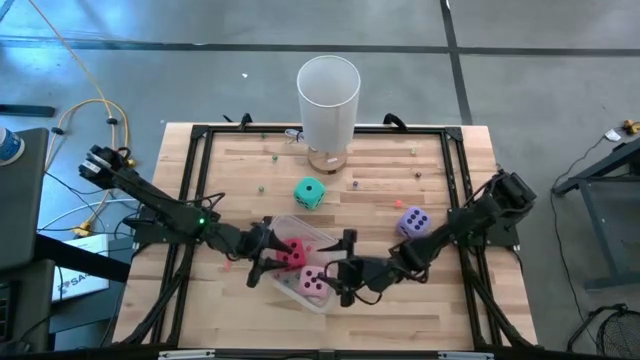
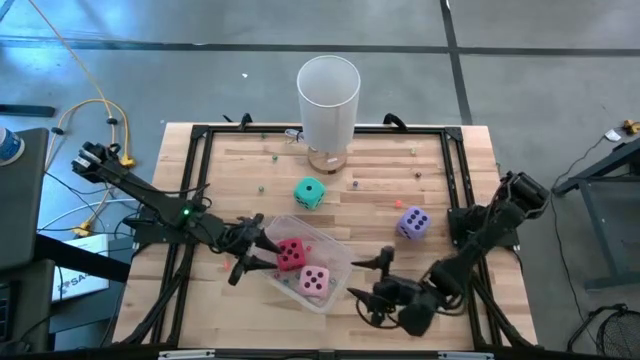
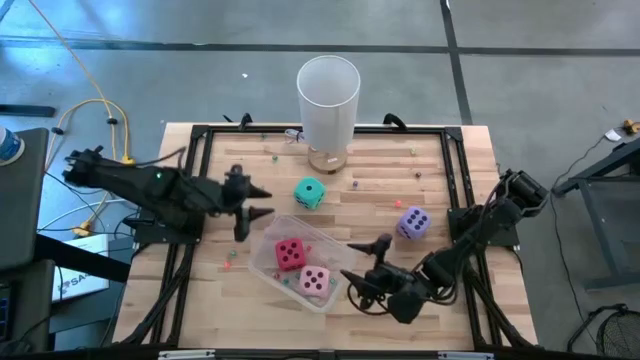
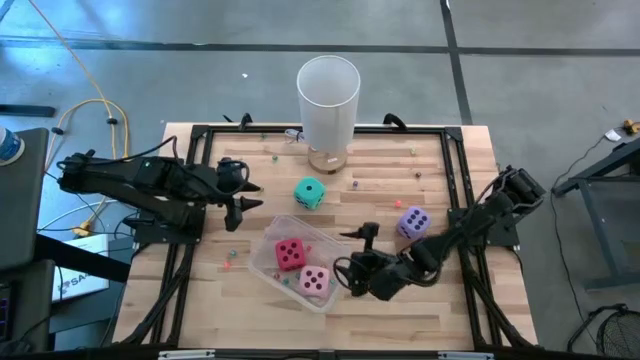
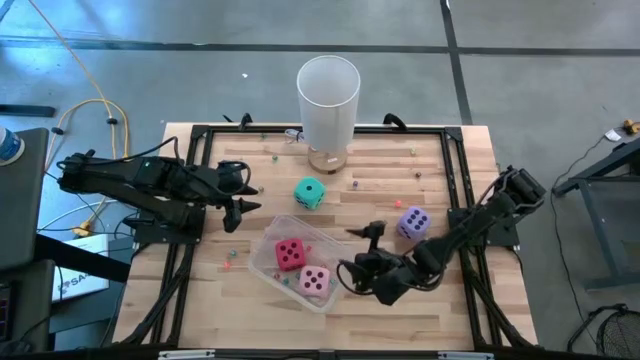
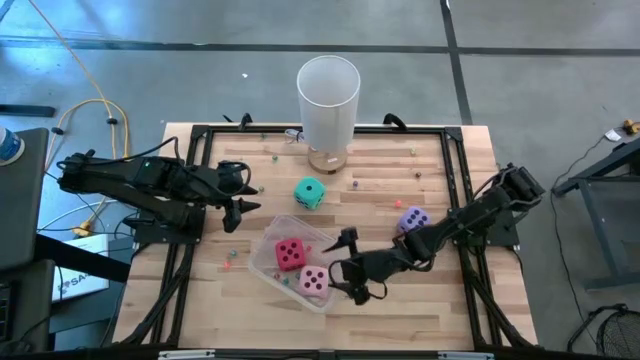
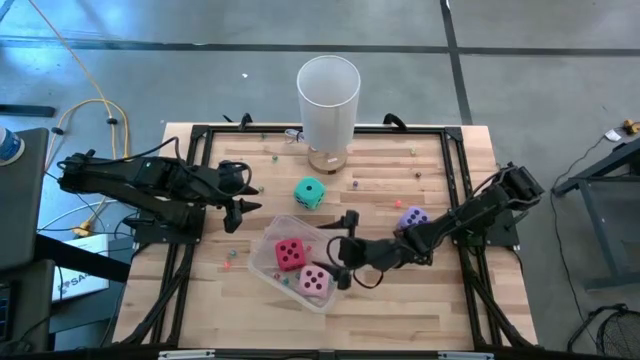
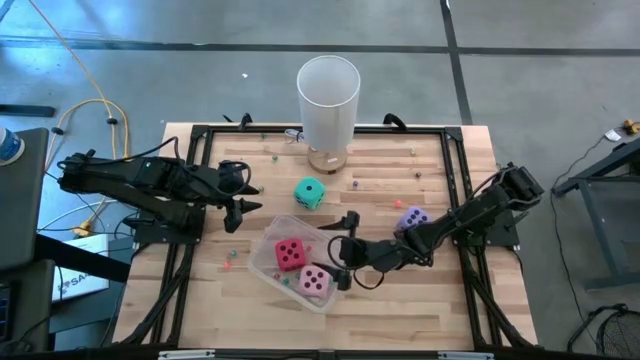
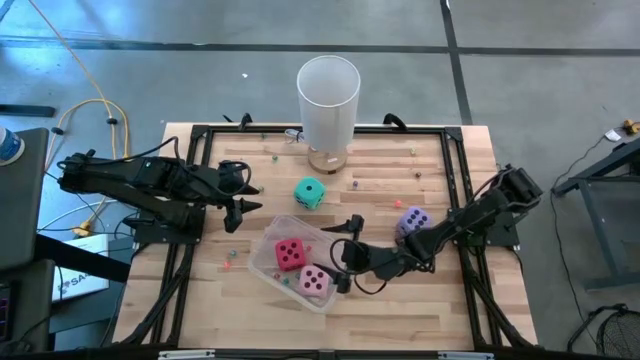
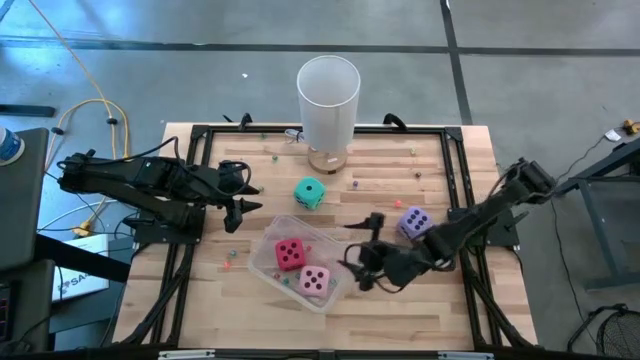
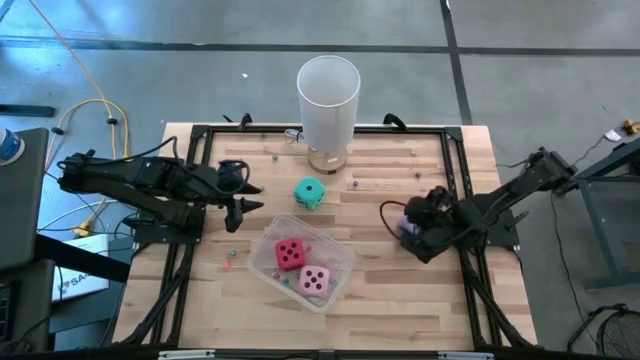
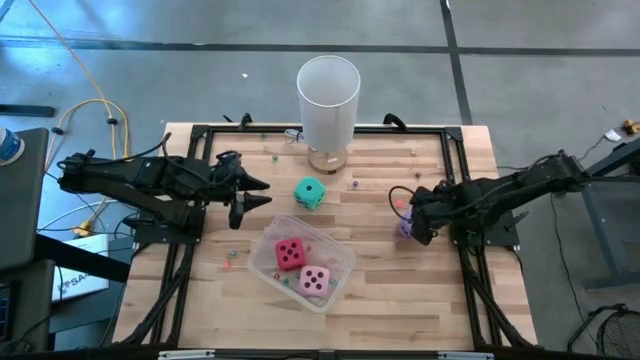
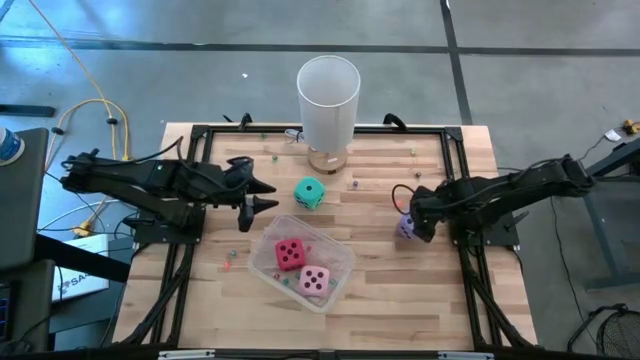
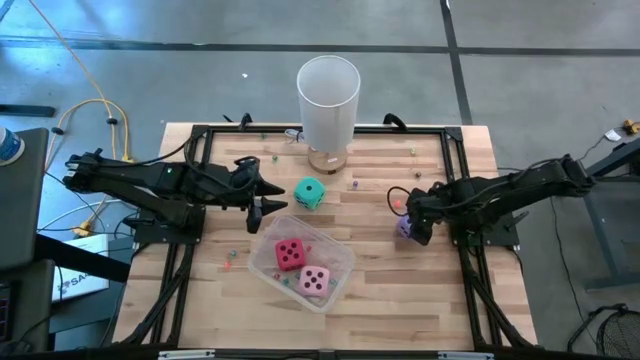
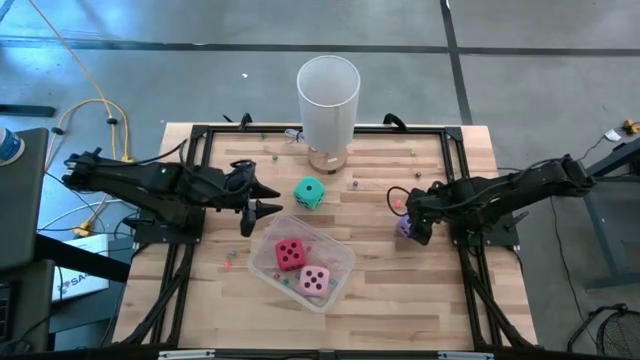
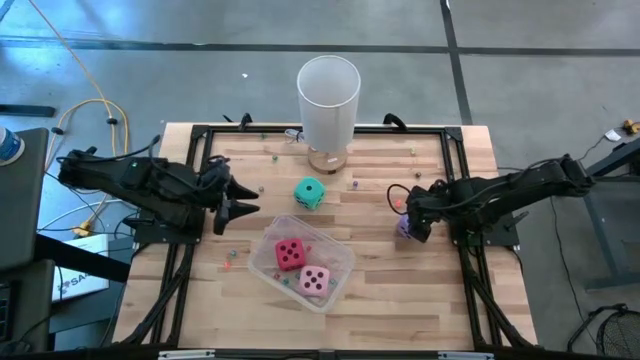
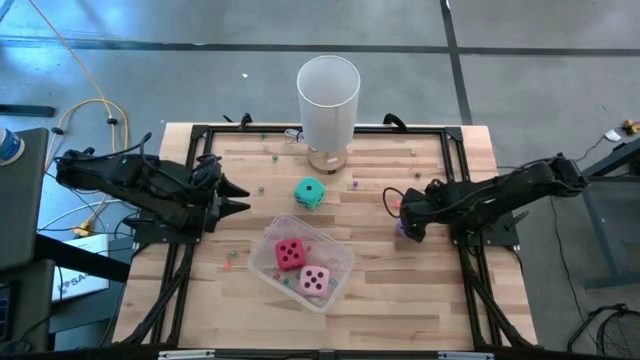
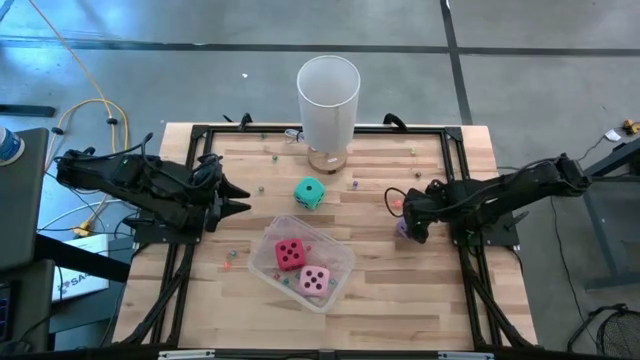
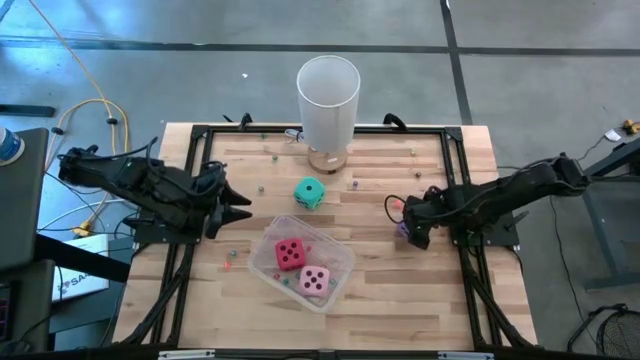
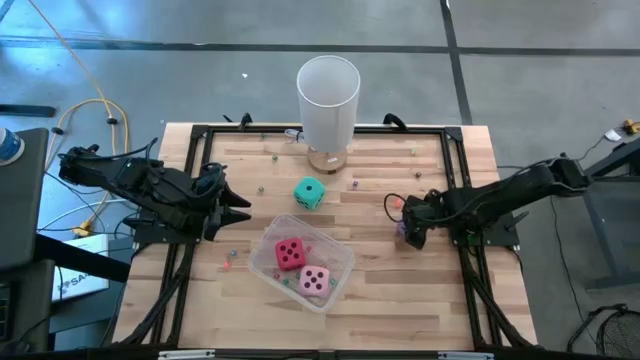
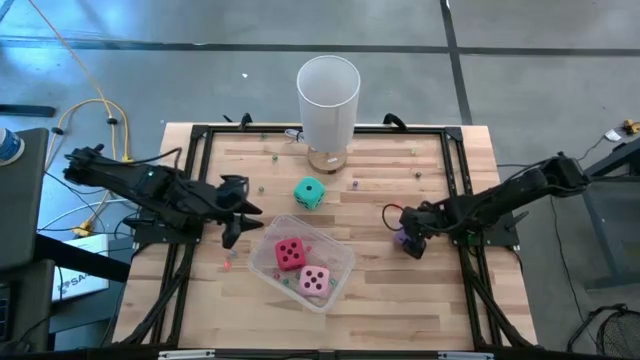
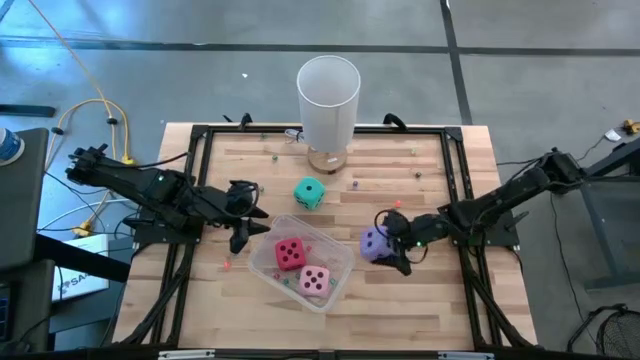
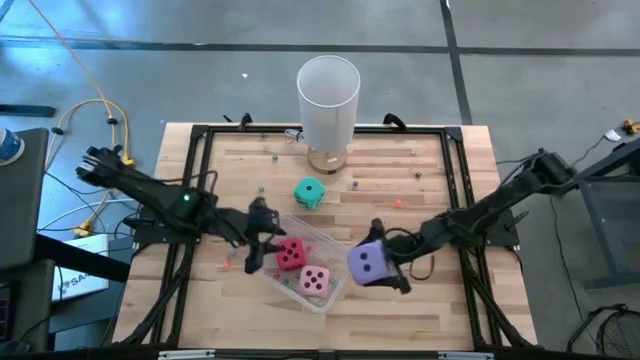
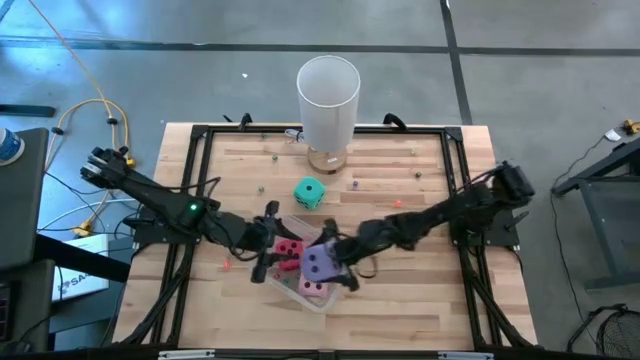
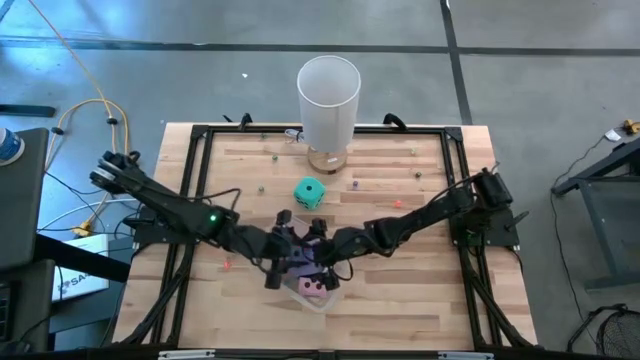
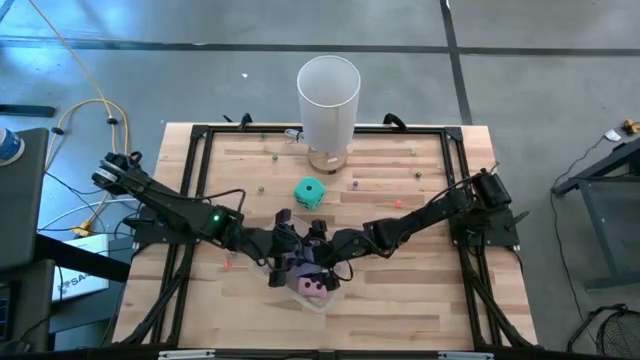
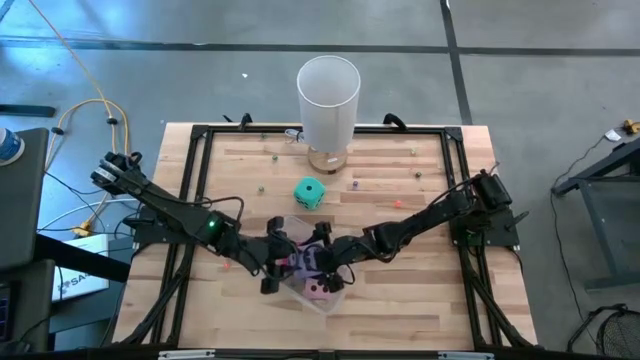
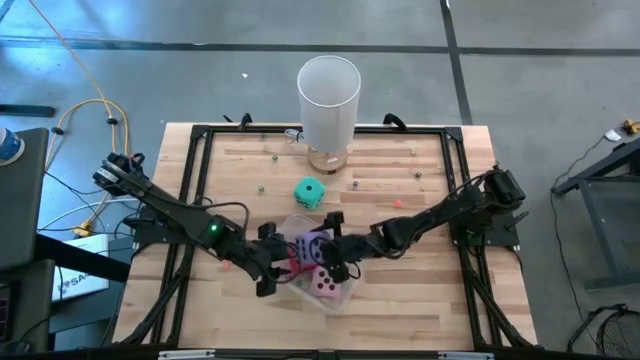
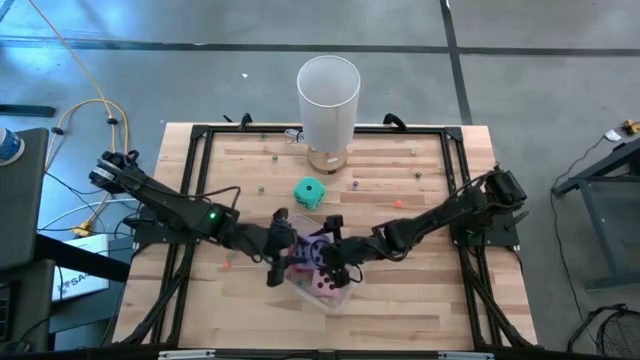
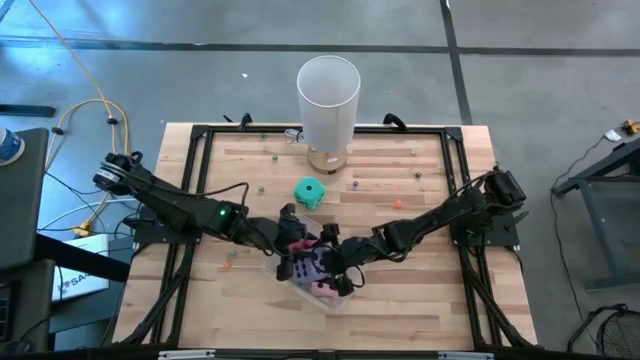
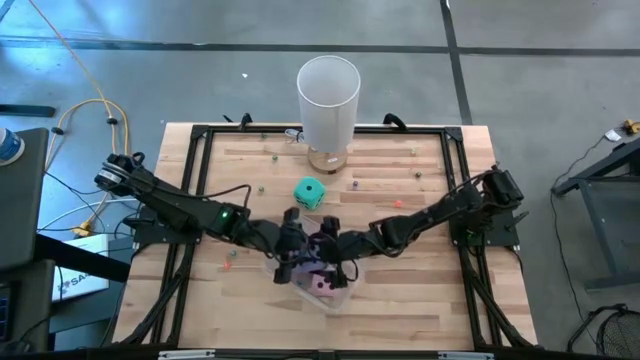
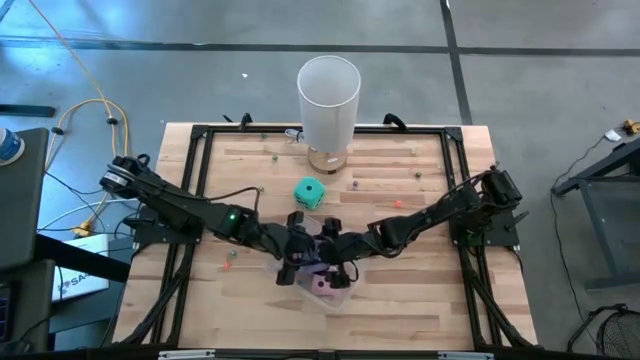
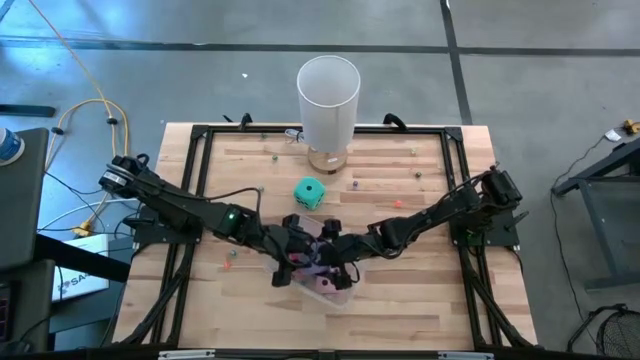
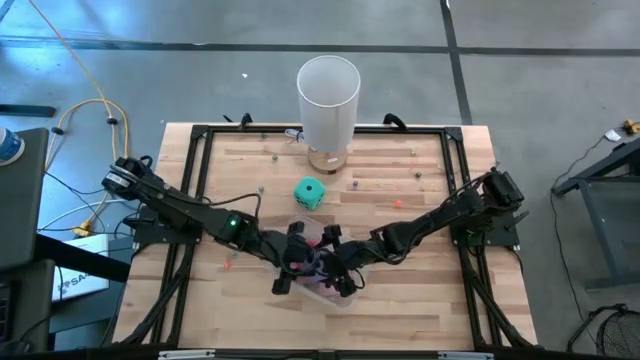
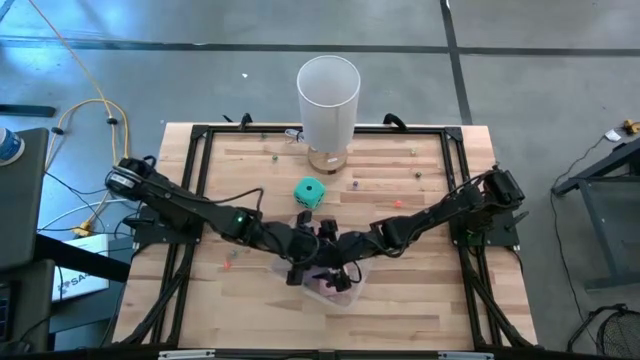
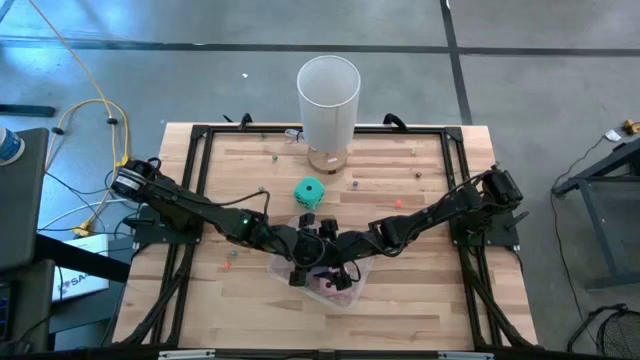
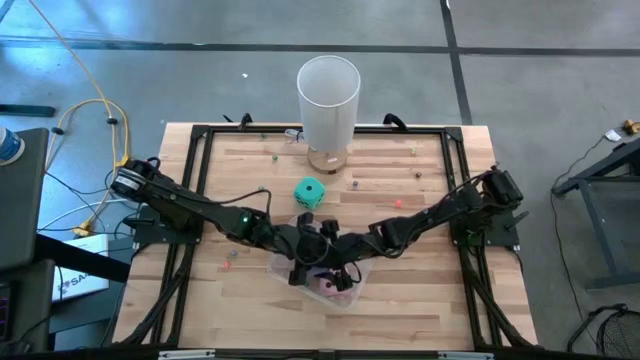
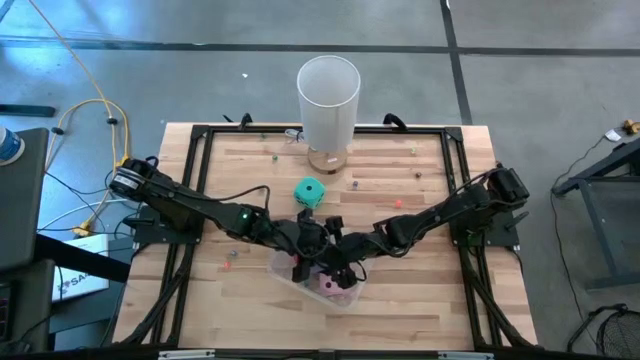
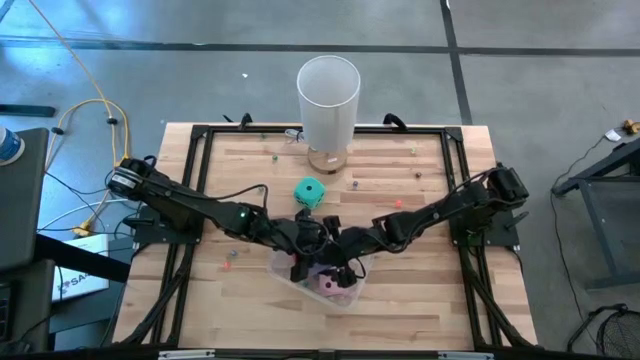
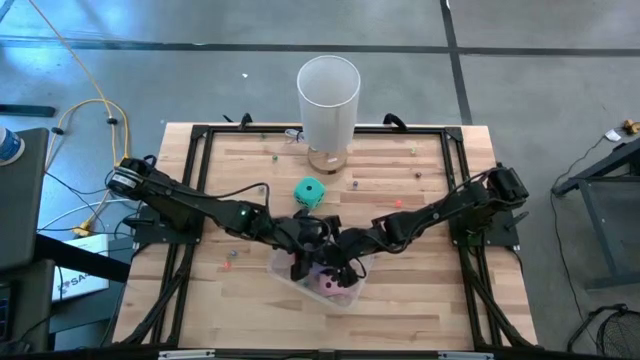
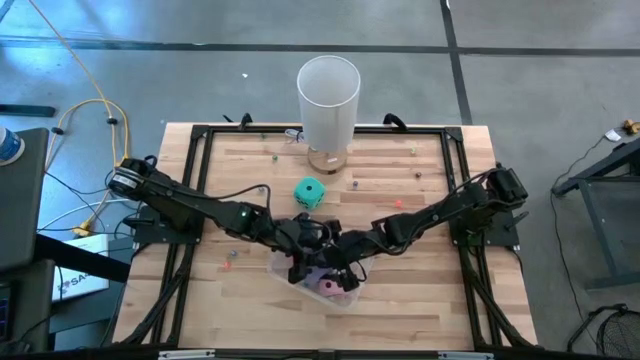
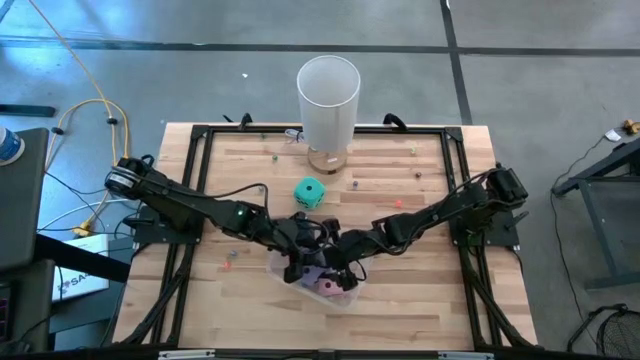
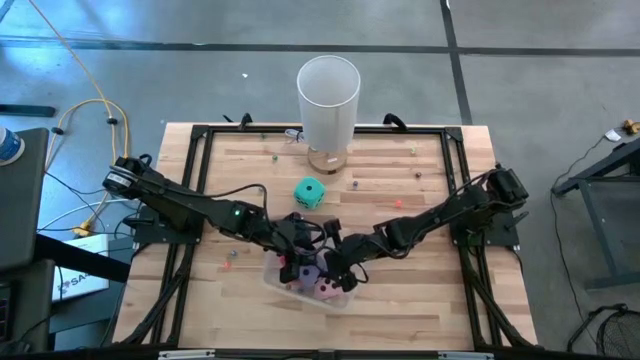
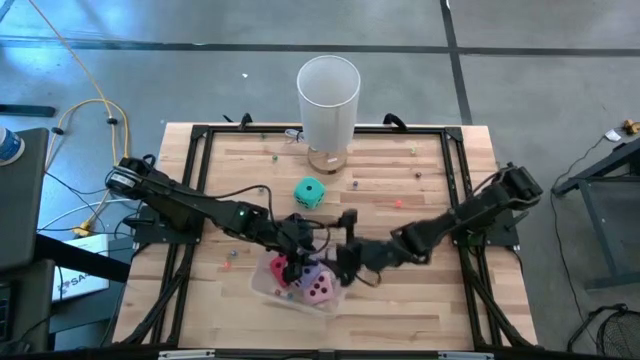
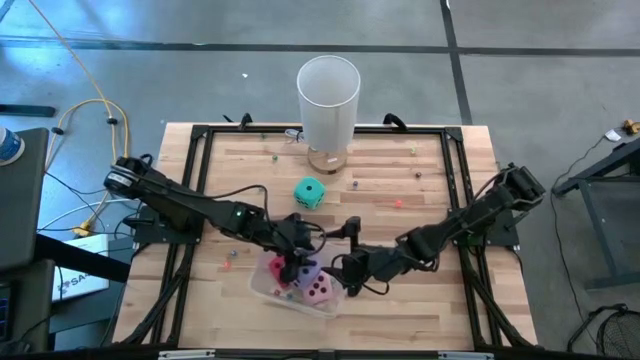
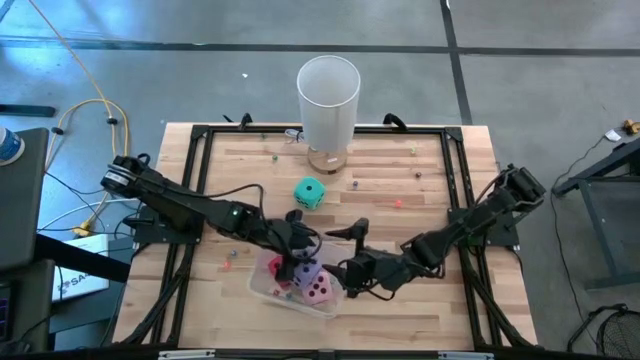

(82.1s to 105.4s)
Task: Pick & Place Dice
Put the big purple dice into the transparent bin
